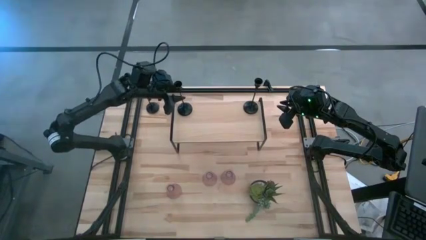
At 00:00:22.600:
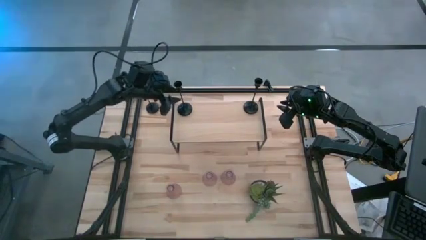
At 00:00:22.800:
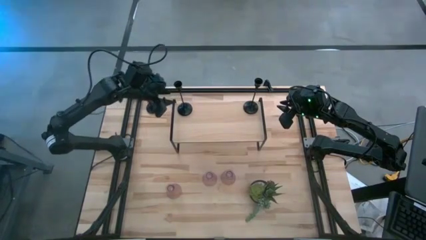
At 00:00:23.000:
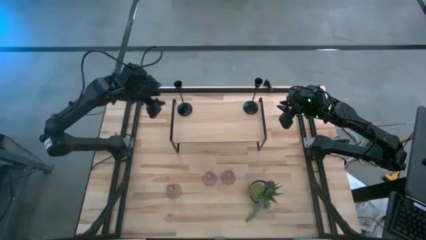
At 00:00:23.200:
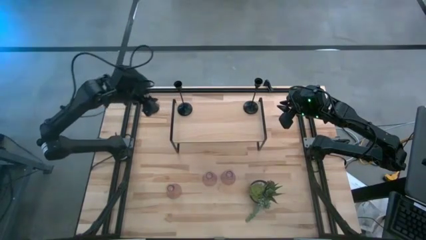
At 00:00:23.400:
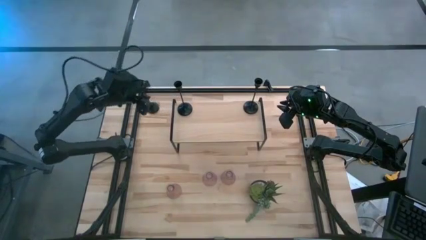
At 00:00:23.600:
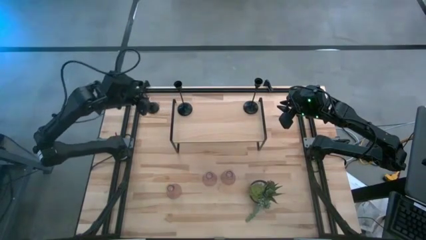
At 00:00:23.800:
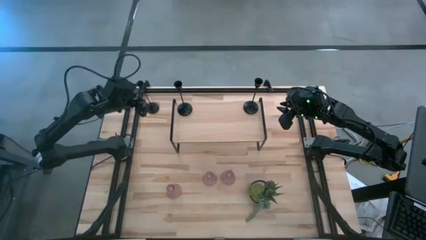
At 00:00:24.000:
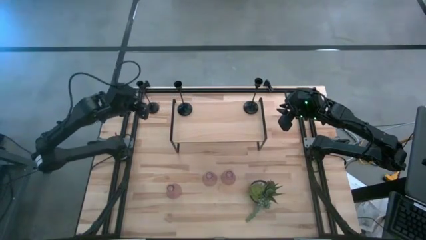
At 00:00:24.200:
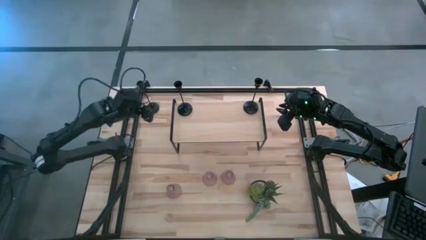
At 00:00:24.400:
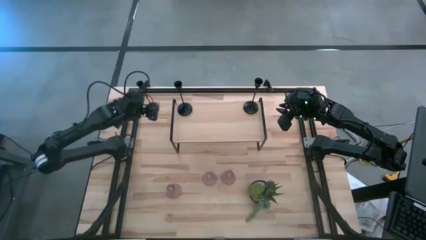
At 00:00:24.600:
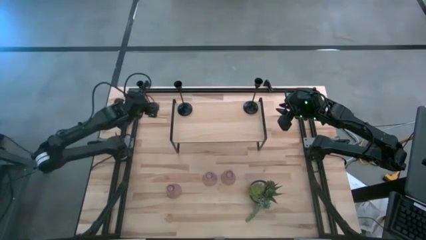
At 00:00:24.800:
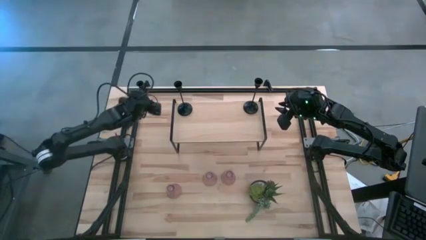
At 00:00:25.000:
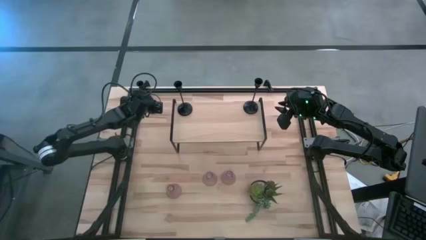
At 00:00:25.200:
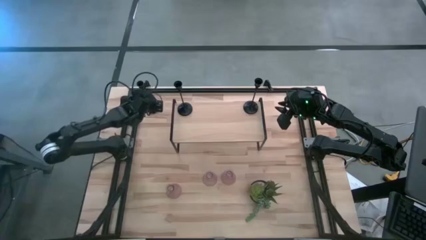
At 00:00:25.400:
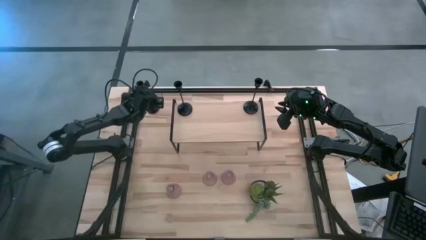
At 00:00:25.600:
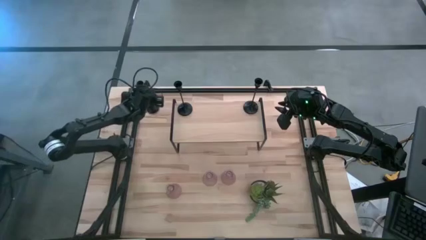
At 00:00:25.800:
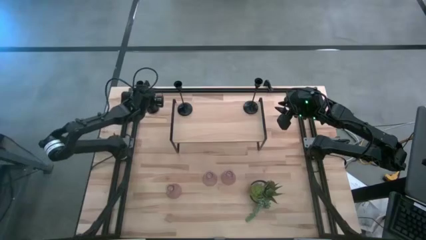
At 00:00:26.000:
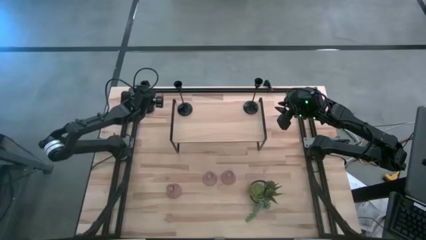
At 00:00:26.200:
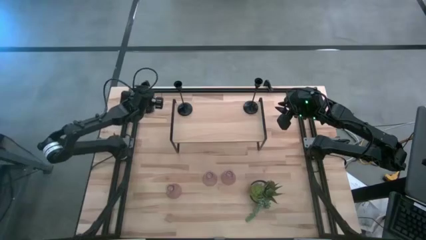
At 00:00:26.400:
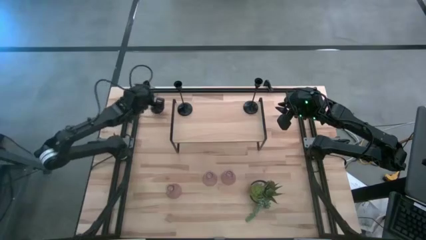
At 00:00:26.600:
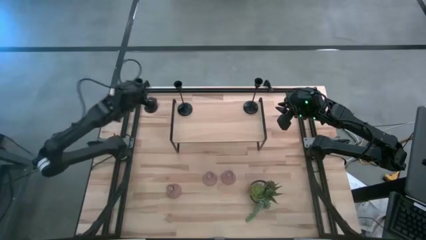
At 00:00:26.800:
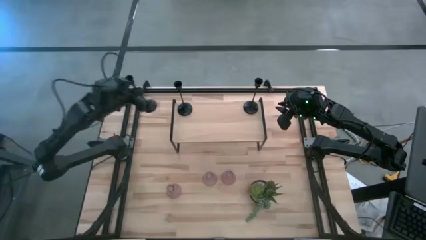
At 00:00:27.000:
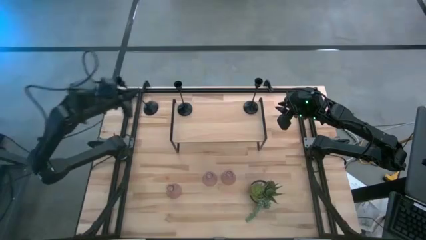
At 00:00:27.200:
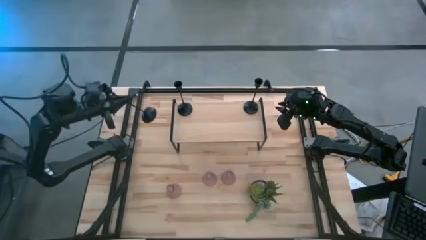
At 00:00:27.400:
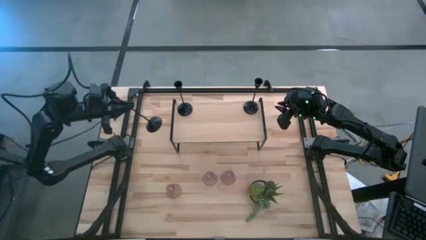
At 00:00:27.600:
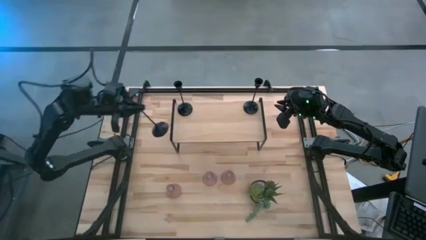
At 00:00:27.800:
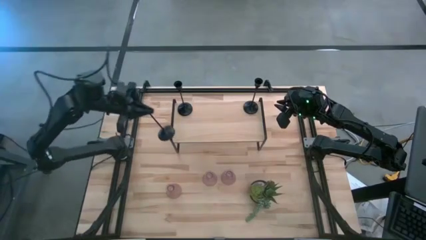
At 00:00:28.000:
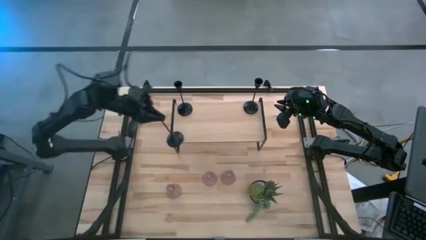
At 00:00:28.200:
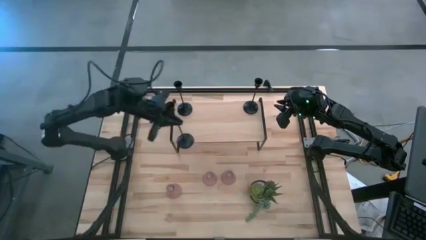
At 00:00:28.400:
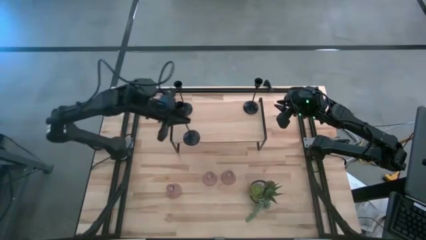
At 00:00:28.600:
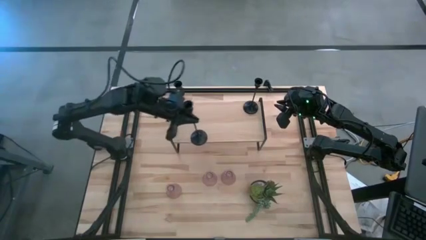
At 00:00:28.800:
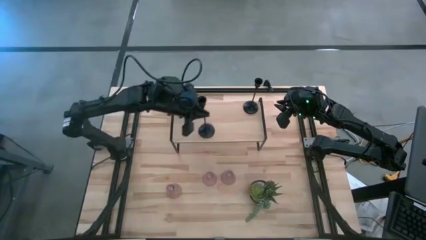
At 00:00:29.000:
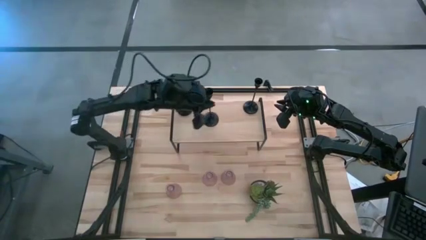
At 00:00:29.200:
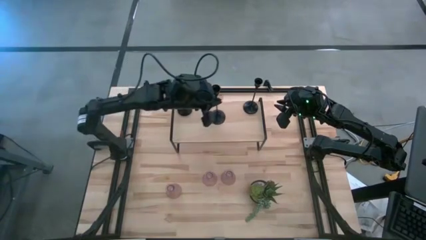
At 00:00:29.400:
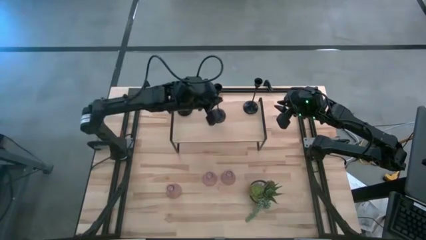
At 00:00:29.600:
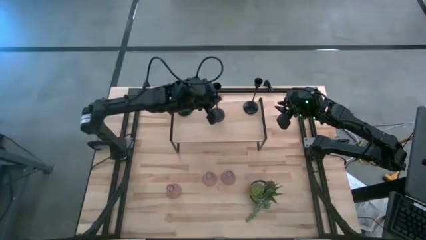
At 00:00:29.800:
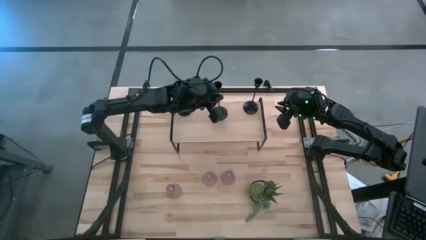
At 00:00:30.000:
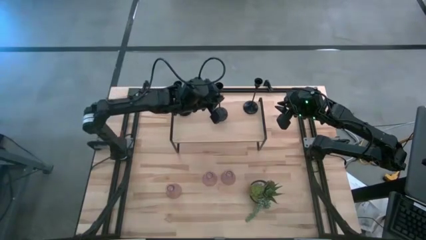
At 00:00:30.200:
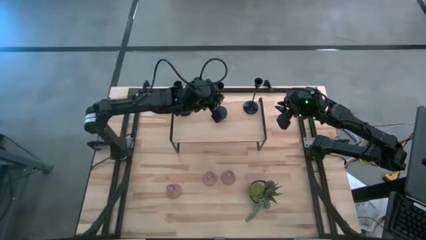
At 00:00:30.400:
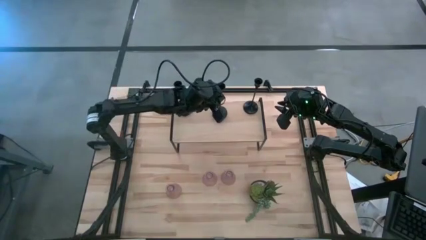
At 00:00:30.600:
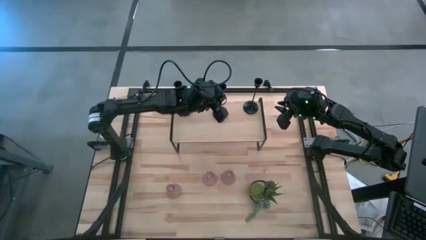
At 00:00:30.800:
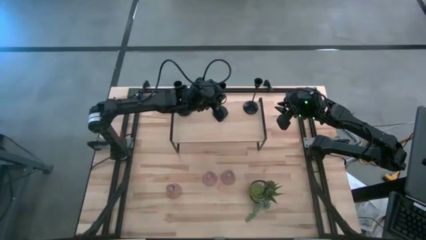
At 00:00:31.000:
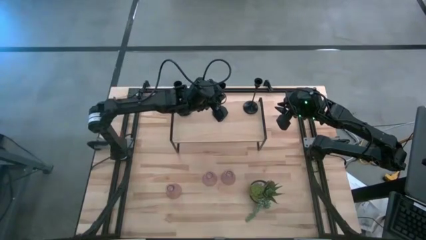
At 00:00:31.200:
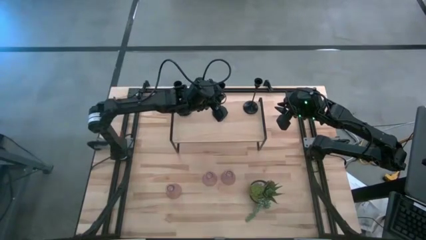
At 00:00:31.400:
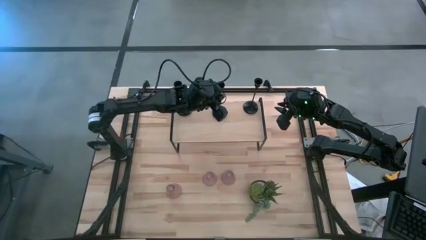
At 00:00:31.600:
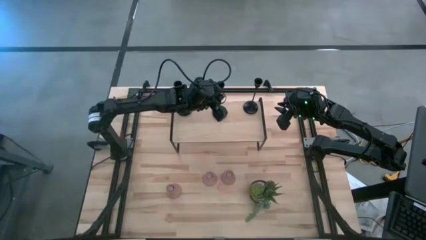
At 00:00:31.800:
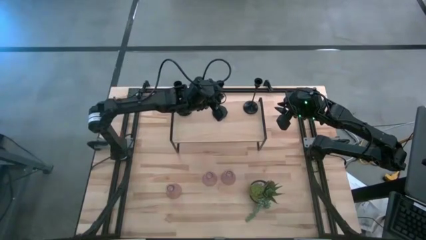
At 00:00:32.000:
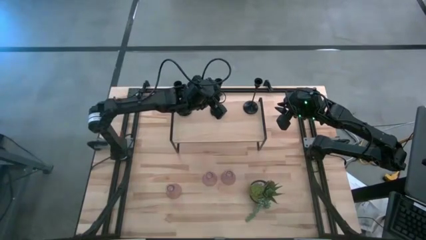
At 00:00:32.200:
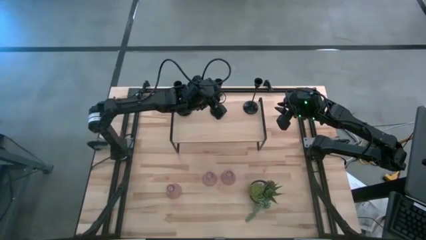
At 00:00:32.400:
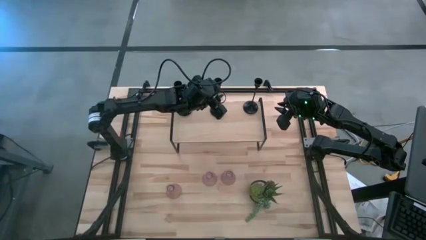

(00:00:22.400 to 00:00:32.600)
Task: Pick & Place candle stick holders
Put the black candle holder on the shelf

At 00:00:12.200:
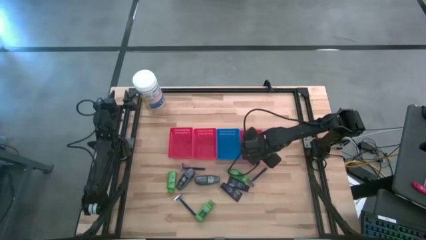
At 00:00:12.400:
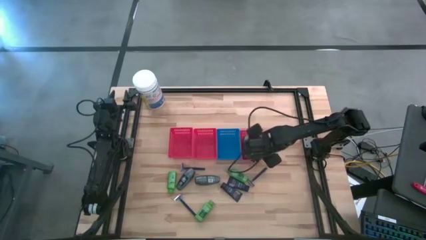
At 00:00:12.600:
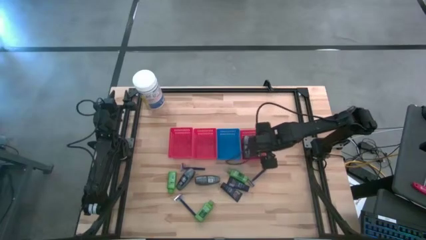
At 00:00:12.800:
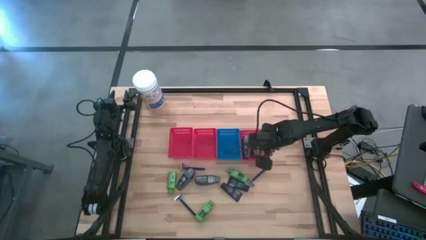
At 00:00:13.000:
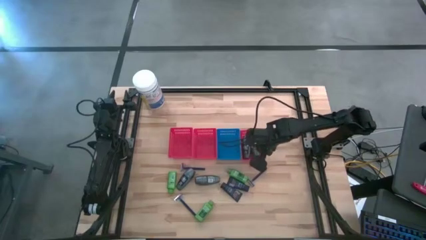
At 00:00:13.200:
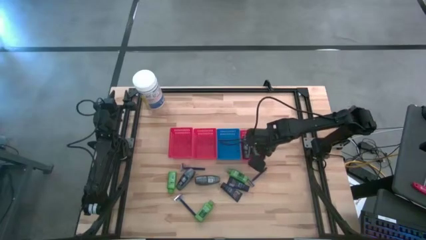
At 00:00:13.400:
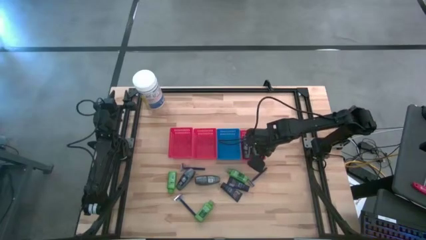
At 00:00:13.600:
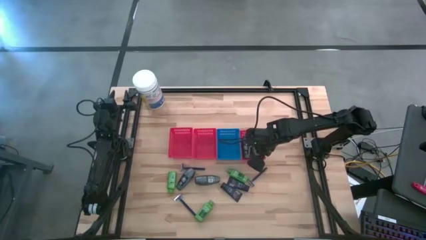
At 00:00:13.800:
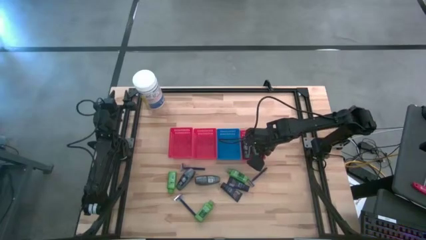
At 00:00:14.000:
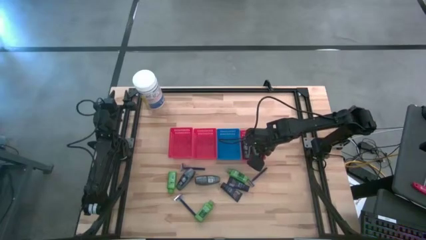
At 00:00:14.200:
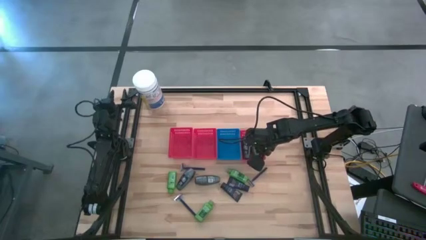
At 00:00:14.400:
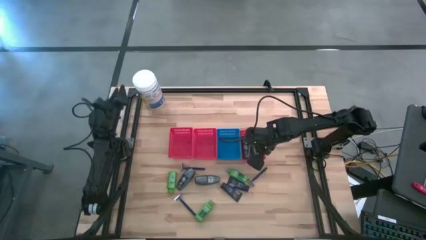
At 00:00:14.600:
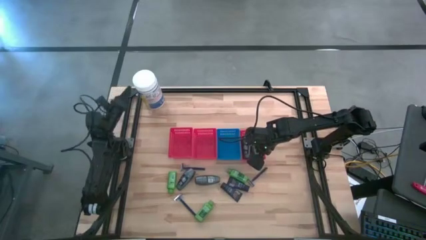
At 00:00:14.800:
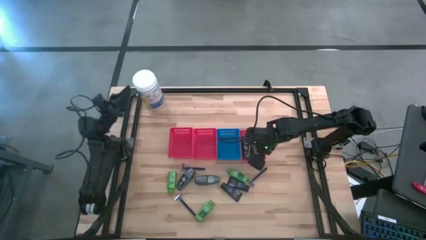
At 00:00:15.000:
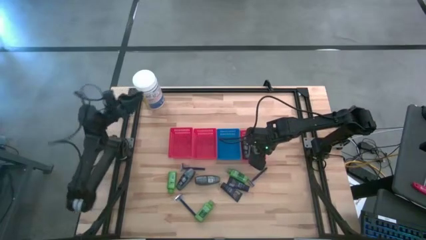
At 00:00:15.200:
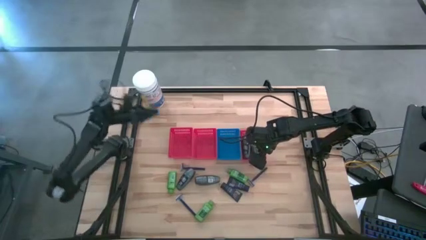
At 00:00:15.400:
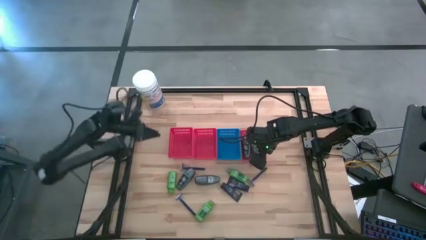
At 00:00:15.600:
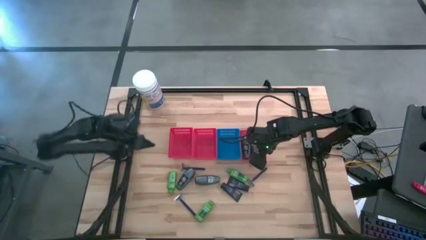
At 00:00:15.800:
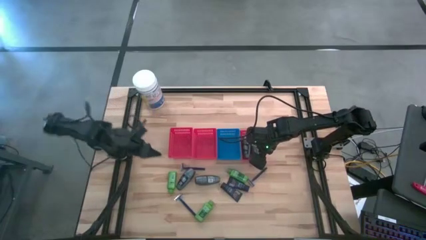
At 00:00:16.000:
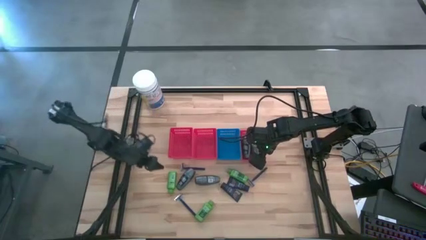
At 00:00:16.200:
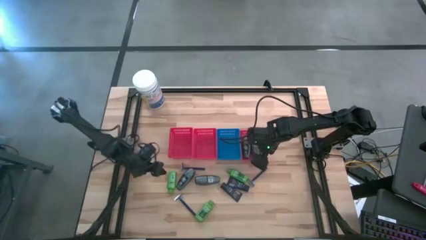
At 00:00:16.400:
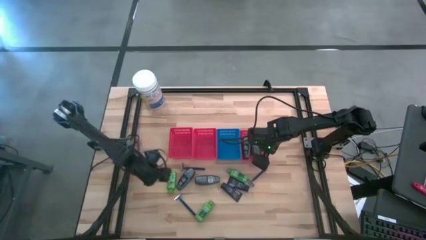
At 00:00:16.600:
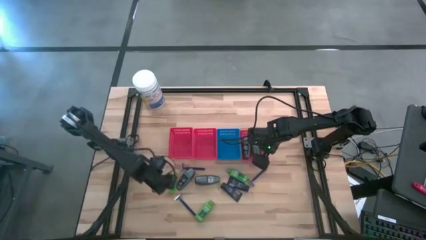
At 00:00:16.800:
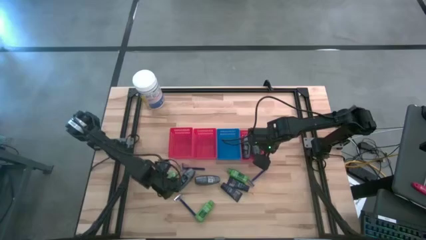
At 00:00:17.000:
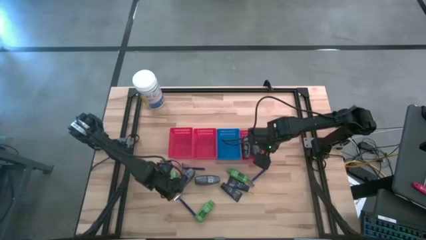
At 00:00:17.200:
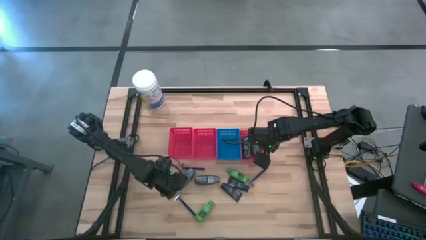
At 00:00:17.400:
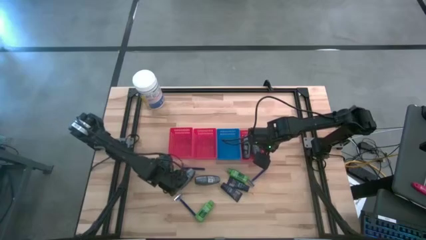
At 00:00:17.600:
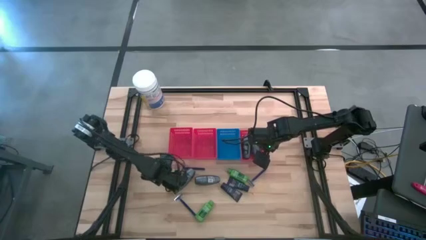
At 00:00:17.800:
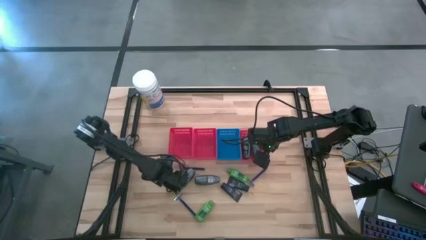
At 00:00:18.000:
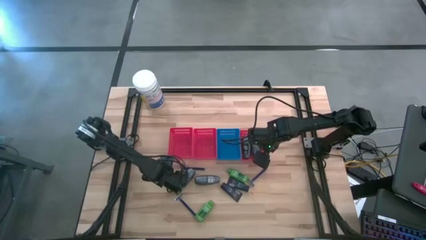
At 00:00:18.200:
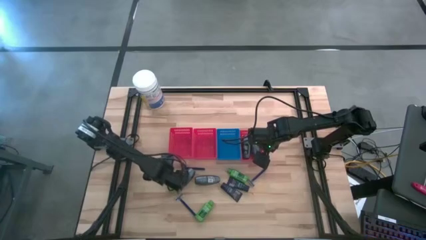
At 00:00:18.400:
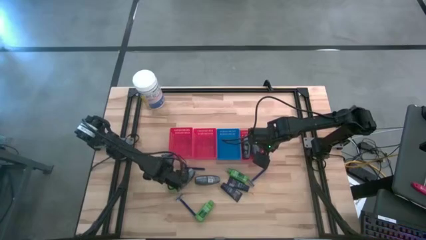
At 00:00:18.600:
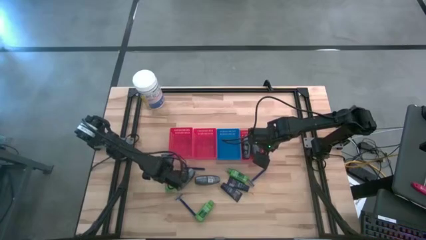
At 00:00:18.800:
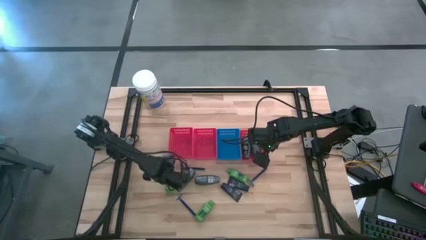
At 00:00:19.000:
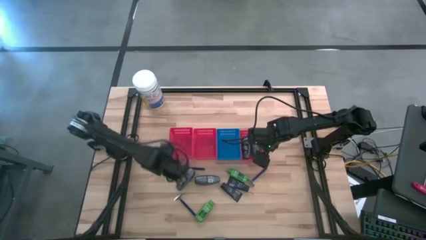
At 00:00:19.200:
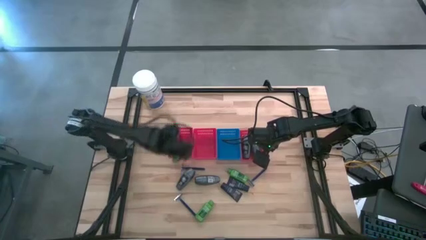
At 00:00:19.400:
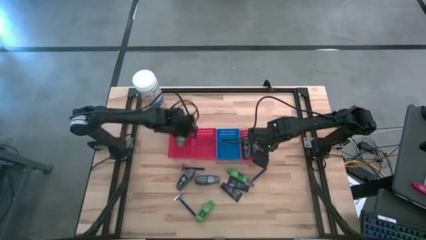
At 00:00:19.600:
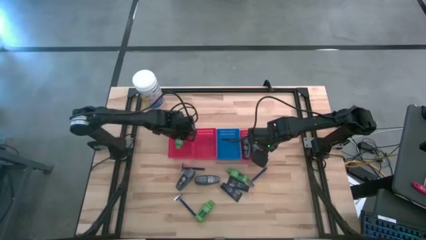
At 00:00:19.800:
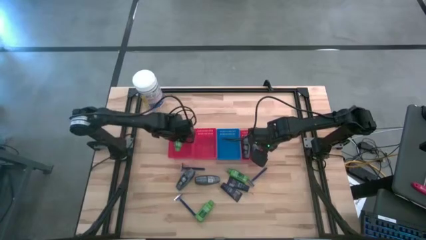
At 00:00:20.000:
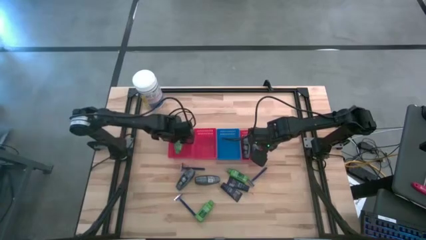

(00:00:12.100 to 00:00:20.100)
Task: Pick & Place Travel size toiletries
Put the green shampoo into the left red bin
